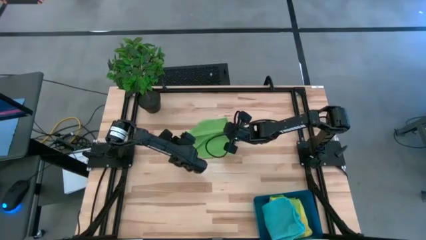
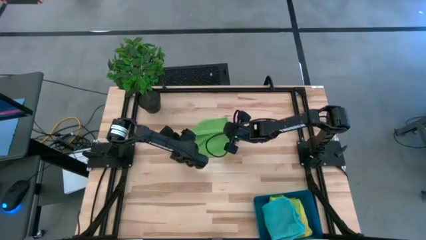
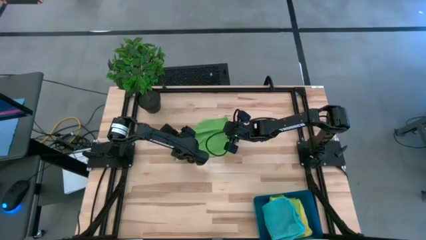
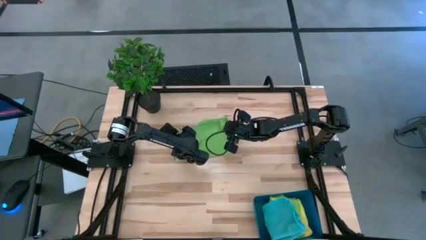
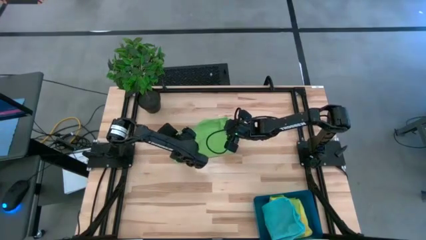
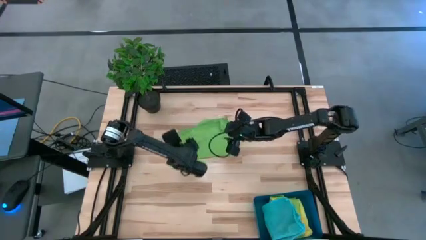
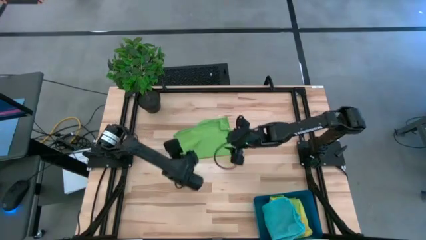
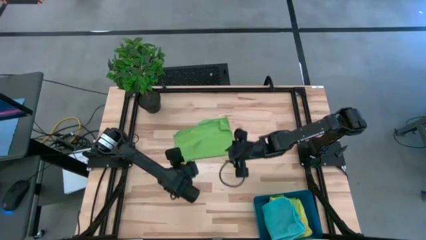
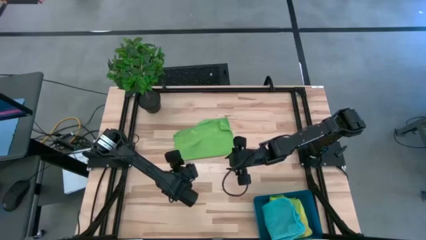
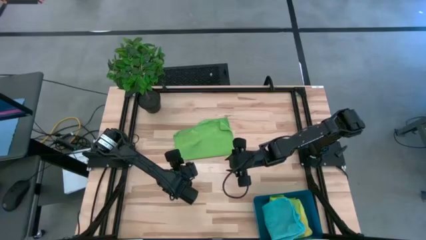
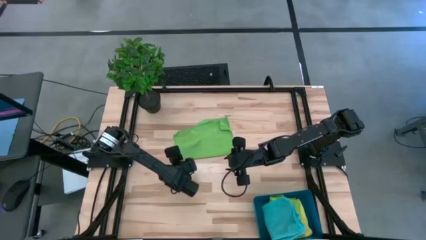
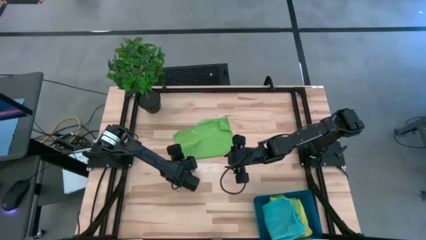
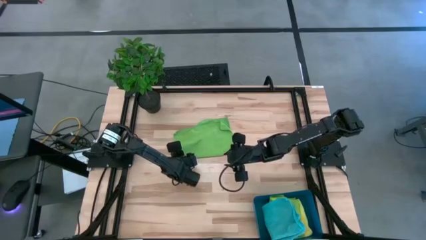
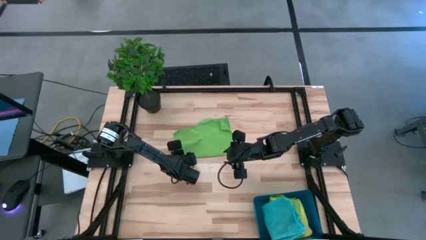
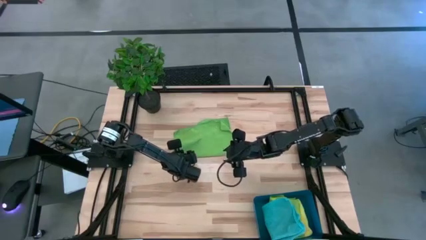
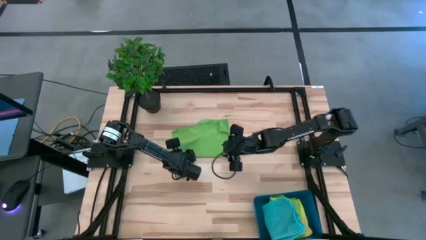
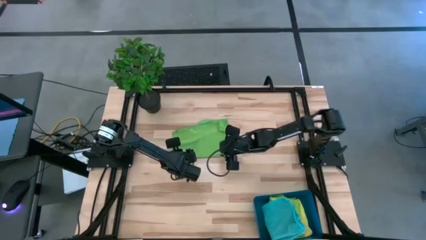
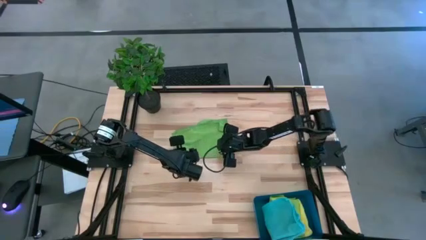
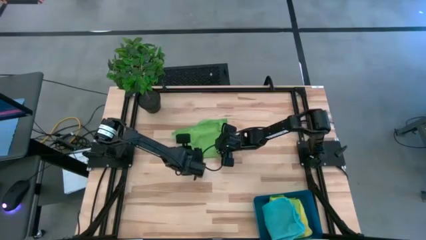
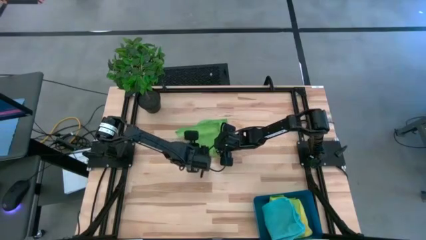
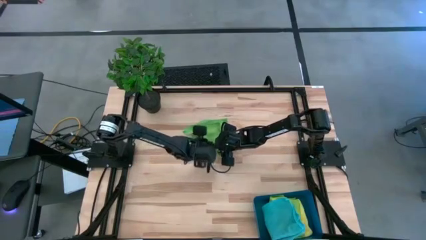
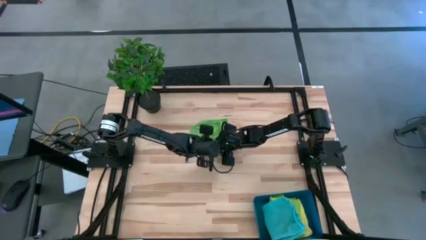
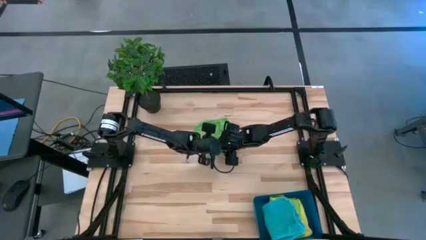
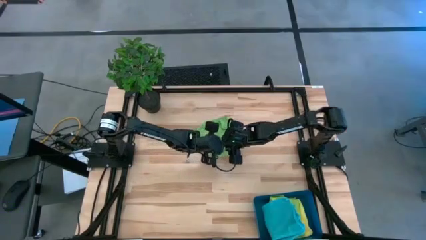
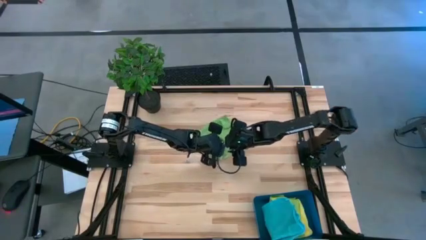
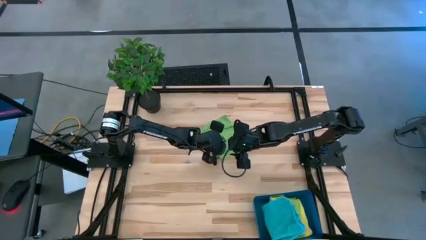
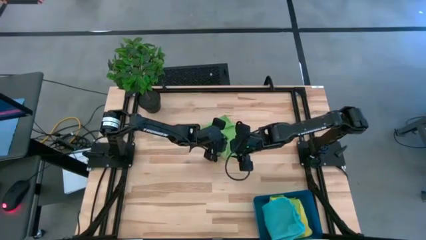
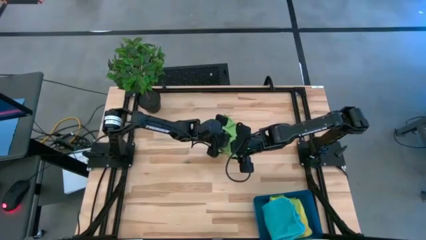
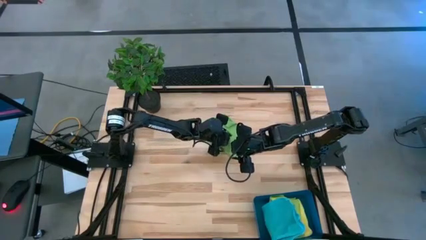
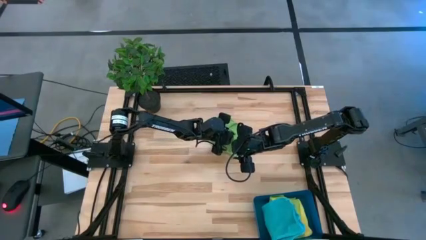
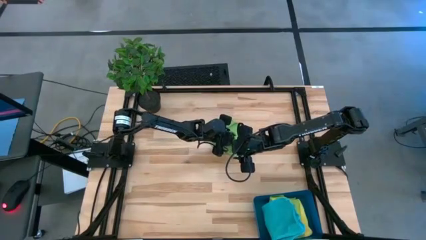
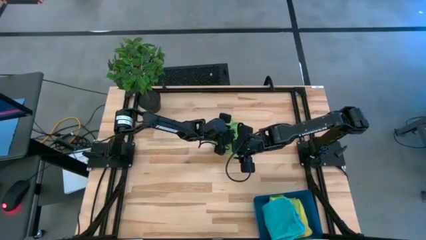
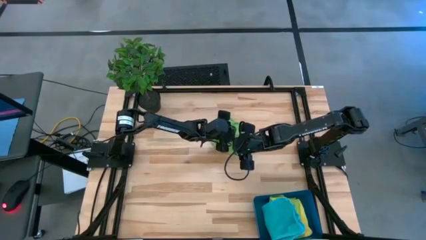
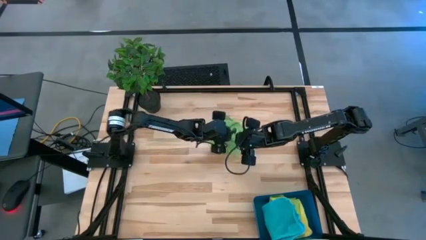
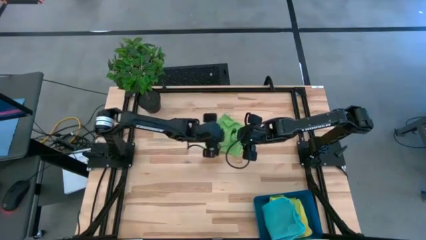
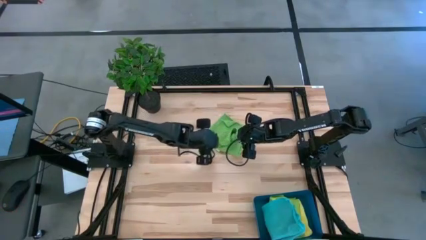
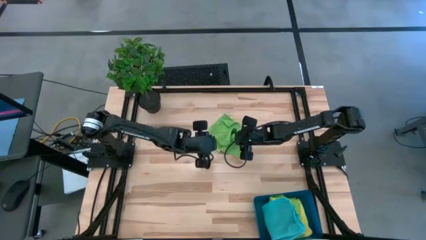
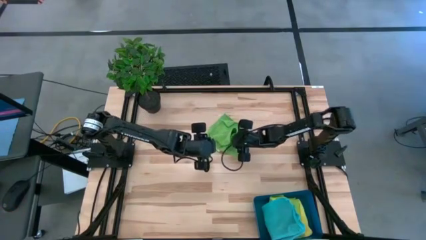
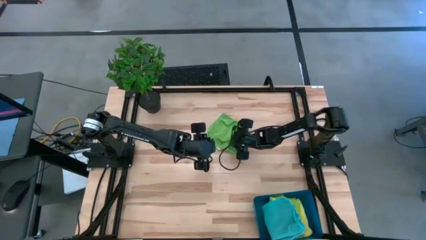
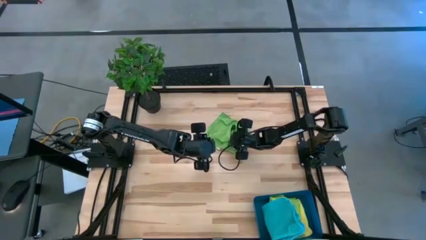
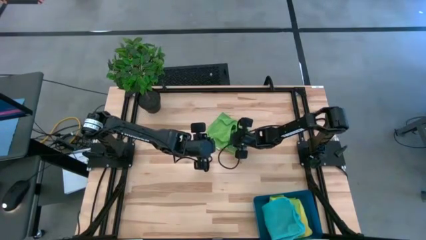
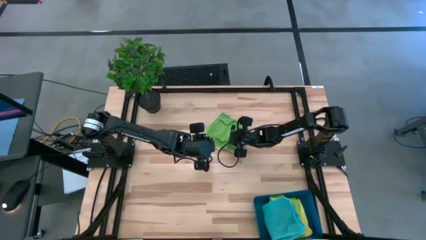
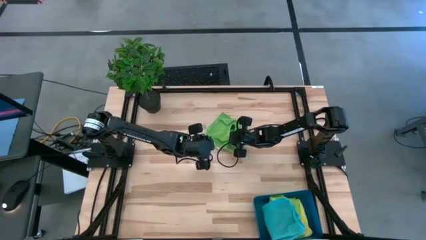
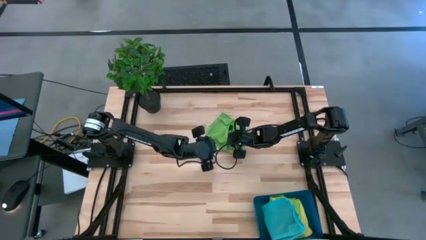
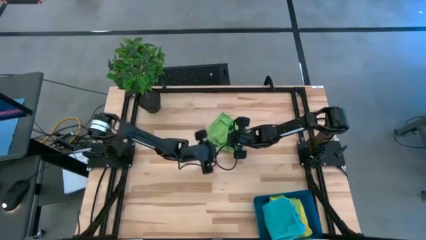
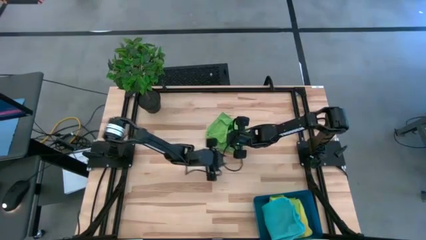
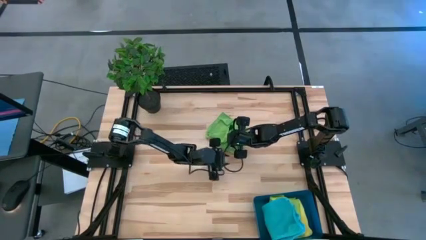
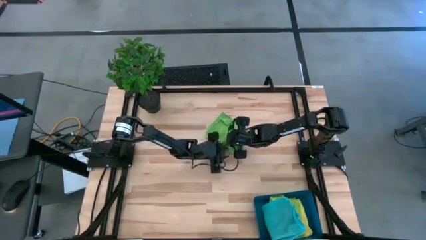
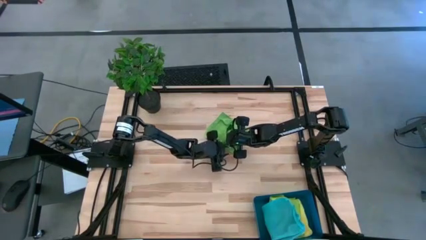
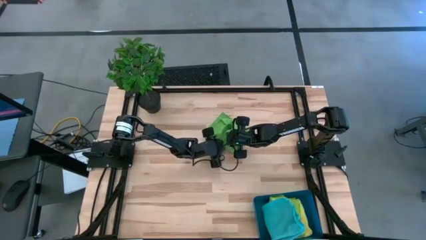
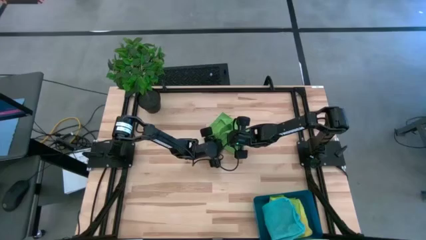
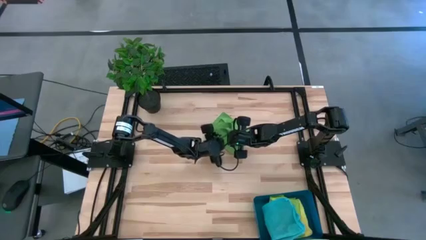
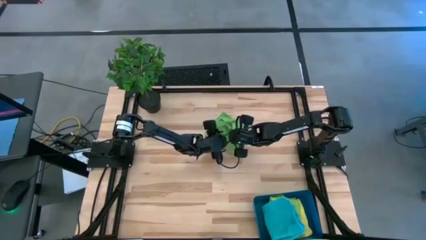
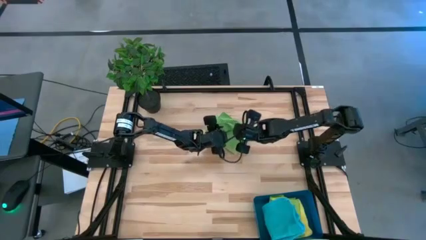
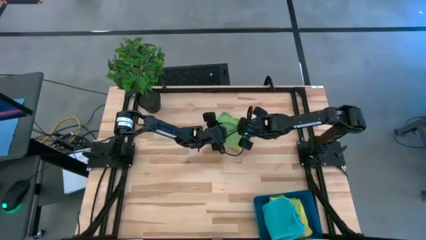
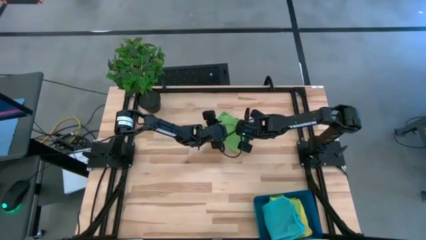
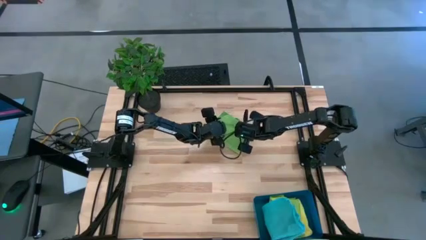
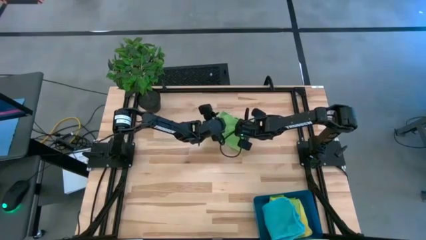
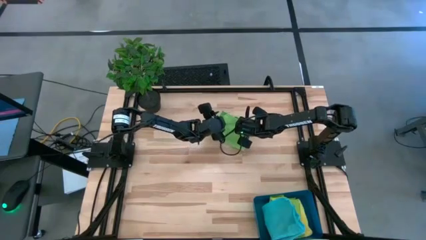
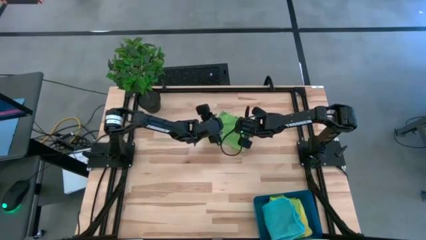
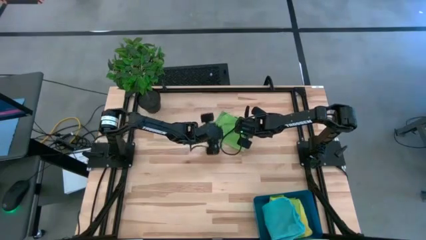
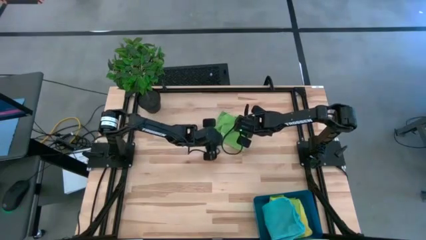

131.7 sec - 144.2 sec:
Task: Fold microfiber towels
Fold the green towel

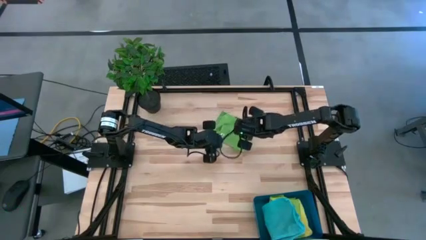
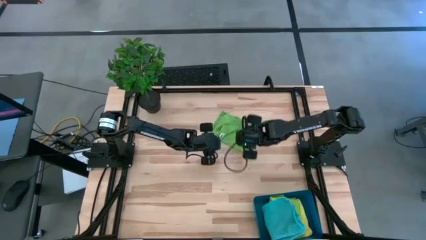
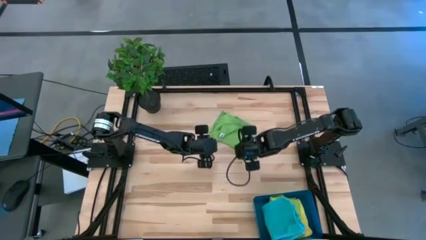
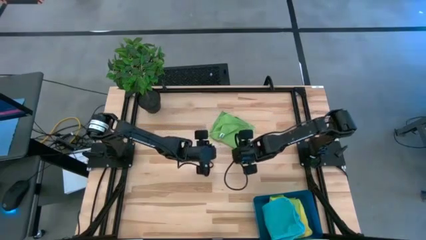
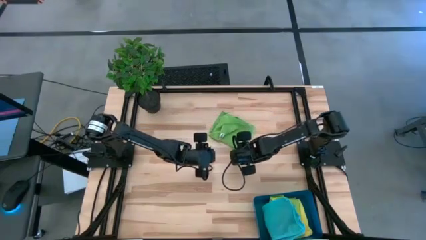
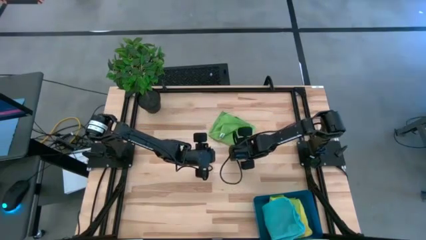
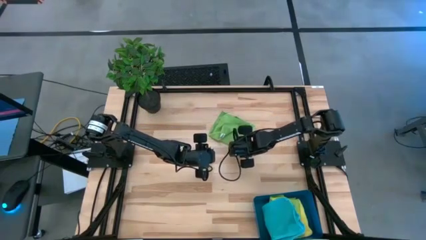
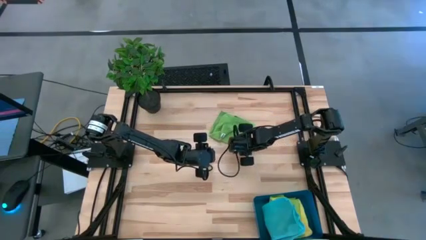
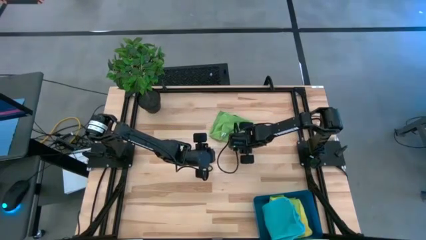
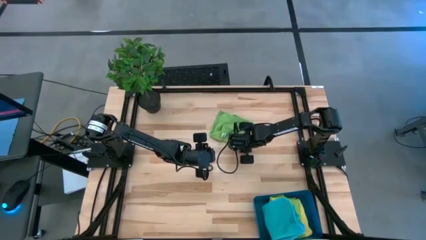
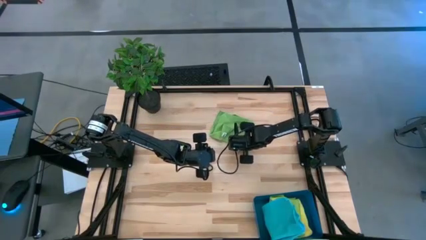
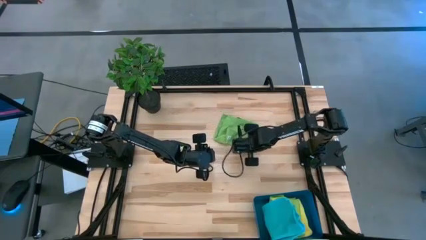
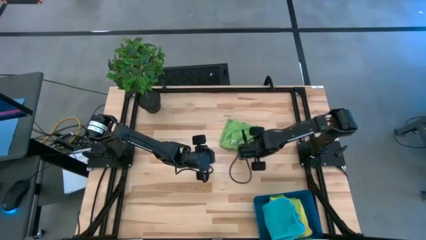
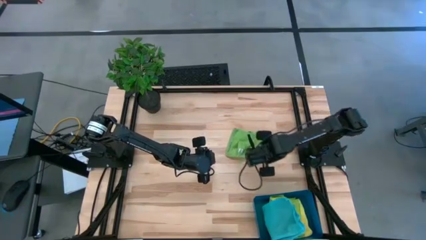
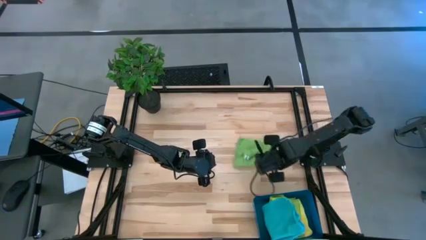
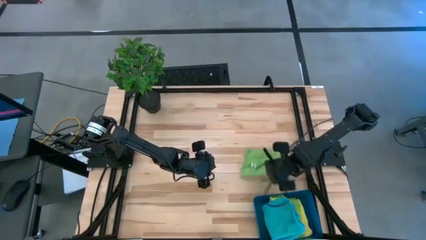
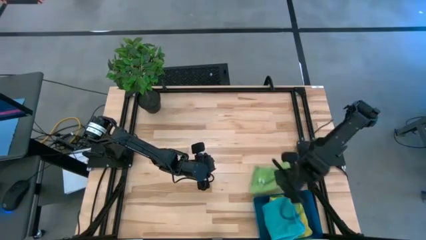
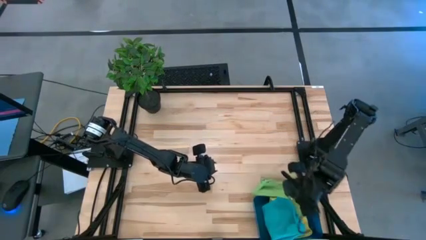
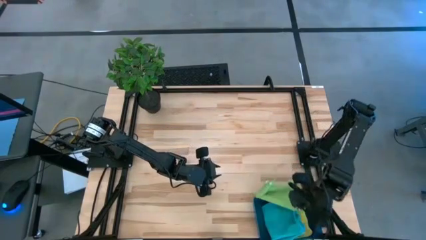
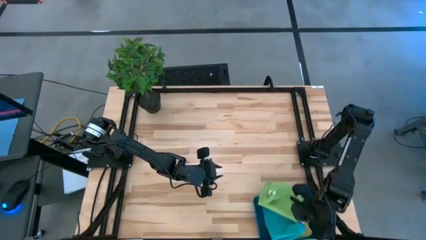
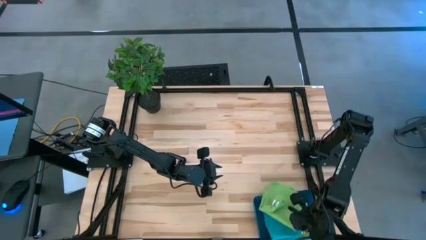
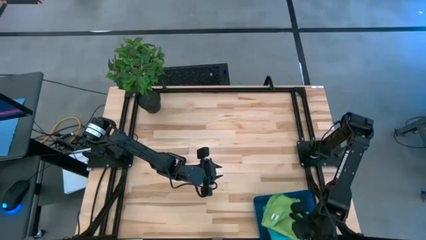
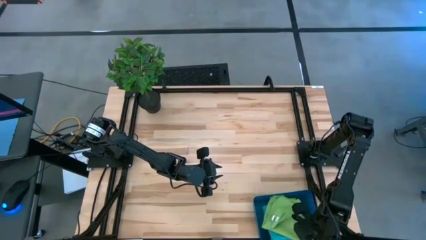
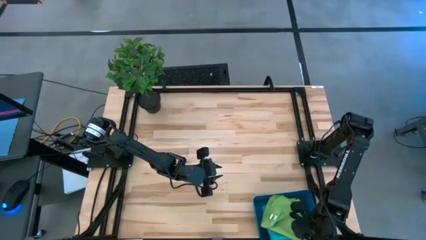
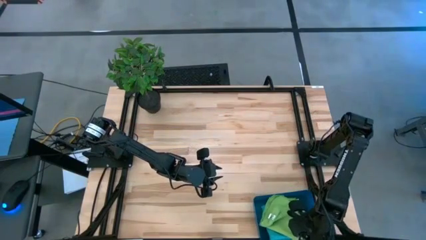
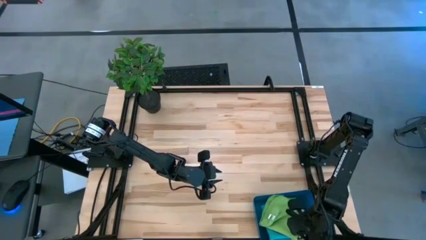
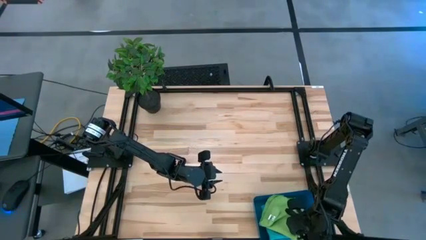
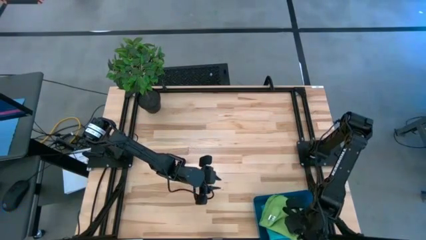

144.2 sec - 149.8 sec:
Put the folded green towel into the bin
